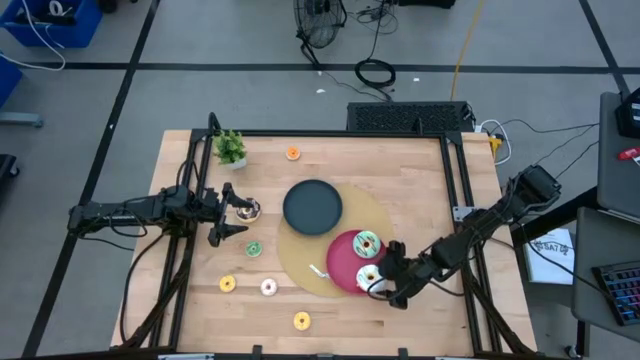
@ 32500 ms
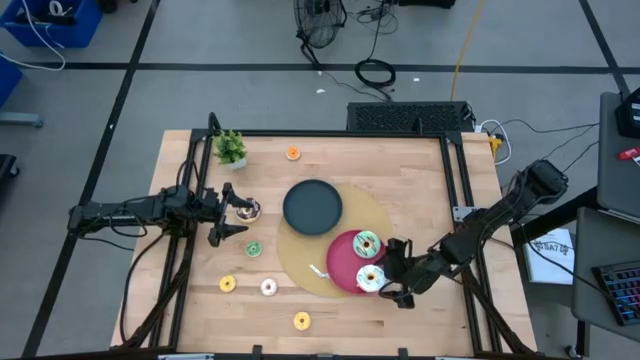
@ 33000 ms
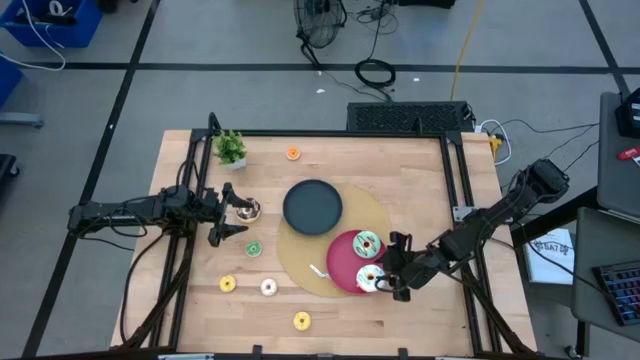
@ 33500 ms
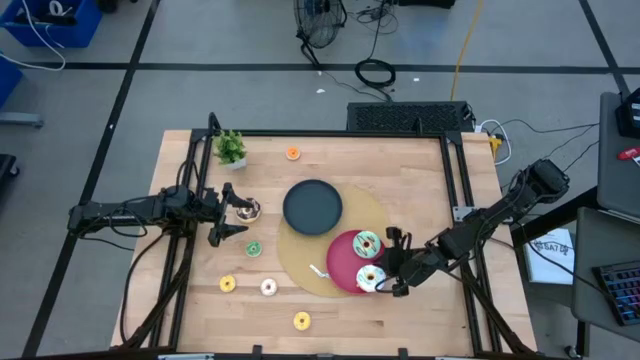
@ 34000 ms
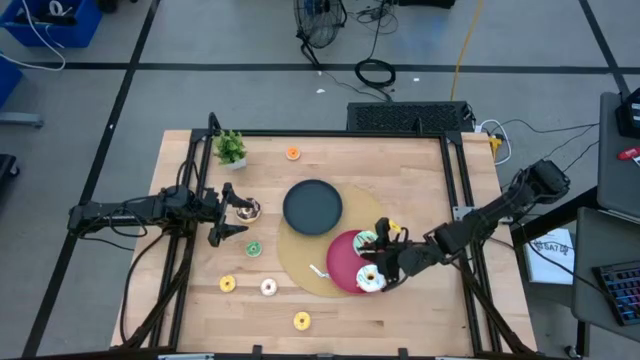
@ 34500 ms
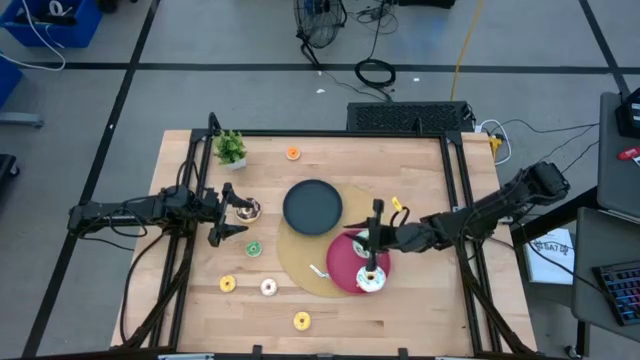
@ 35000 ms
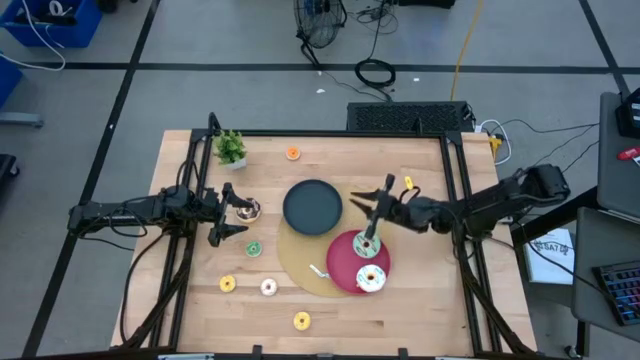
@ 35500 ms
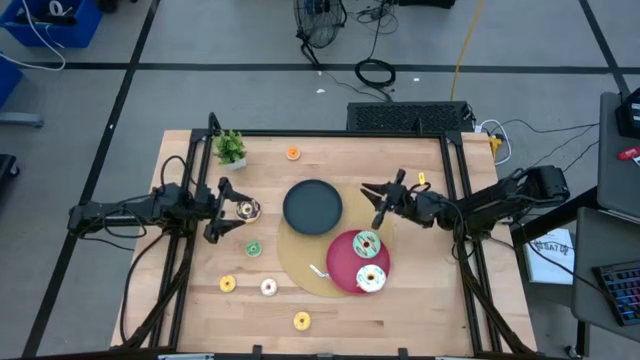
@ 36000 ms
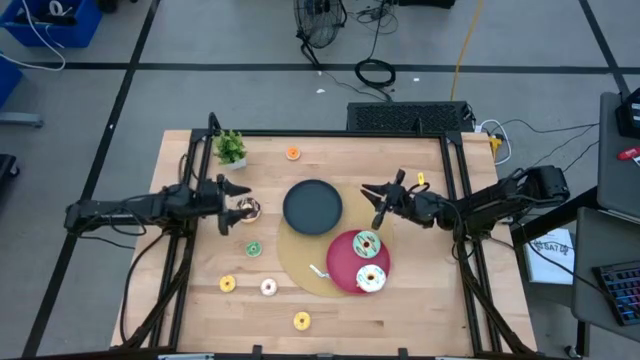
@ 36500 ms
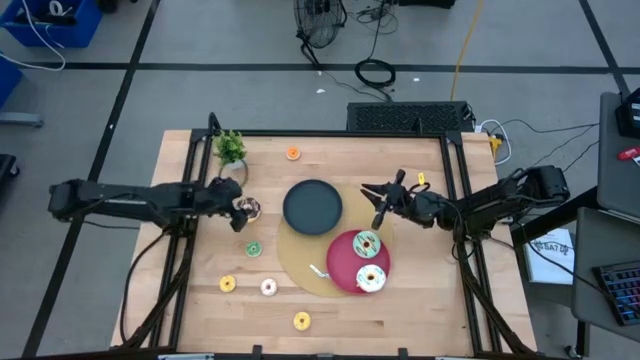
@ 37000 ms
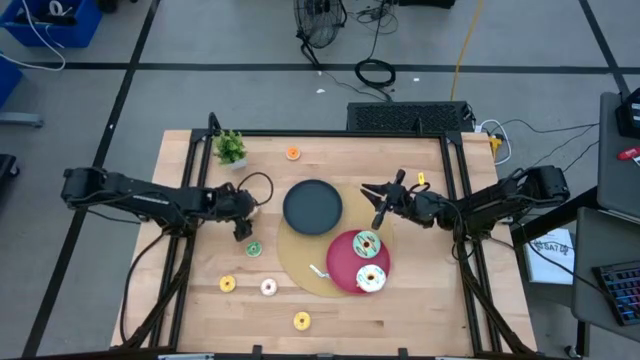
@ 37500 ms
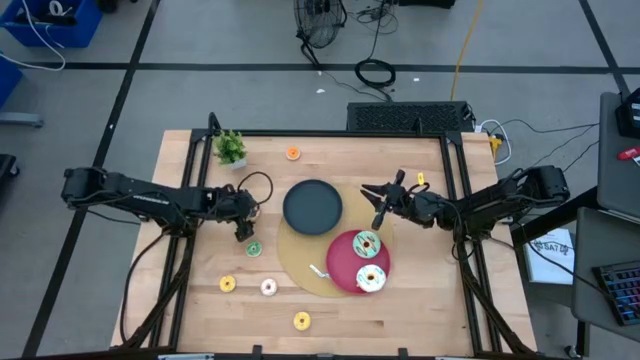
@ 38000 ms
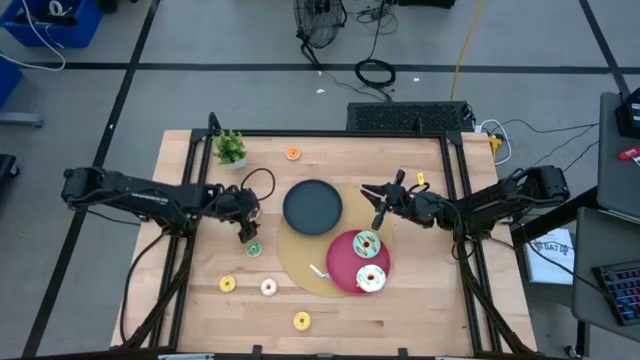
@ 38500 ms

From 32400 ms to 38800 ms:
Task: Pick & Place donuts
Put the large black doughnut on the pink plate

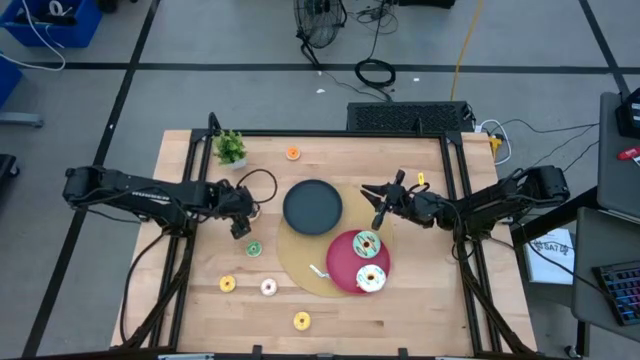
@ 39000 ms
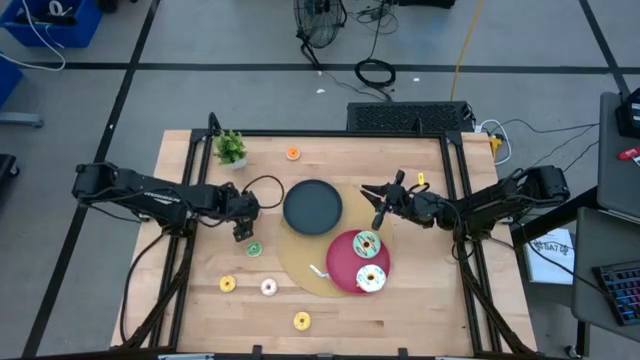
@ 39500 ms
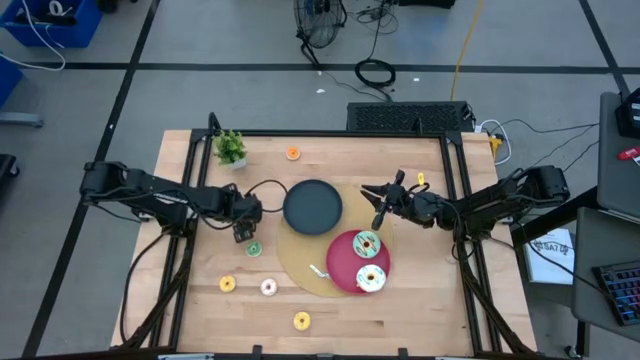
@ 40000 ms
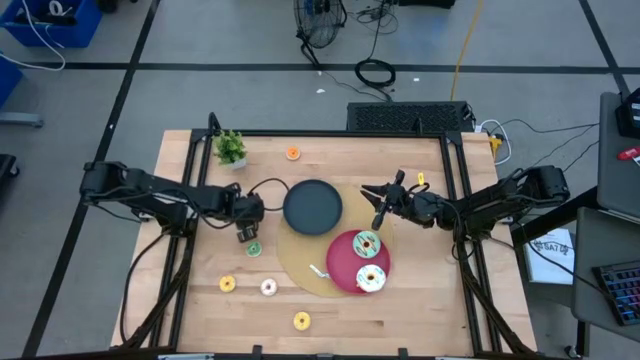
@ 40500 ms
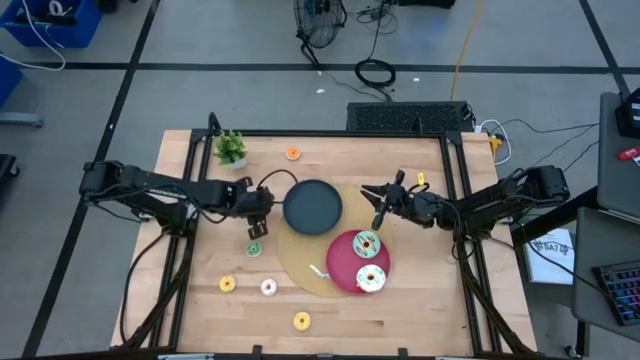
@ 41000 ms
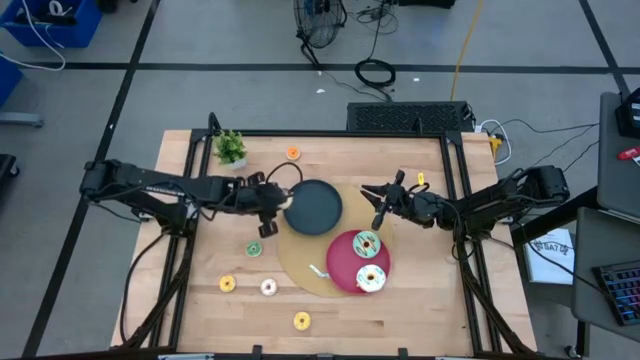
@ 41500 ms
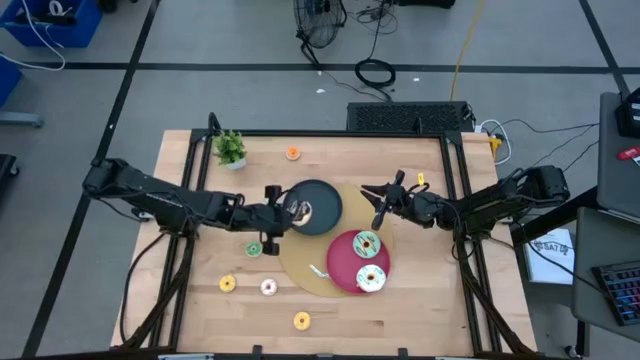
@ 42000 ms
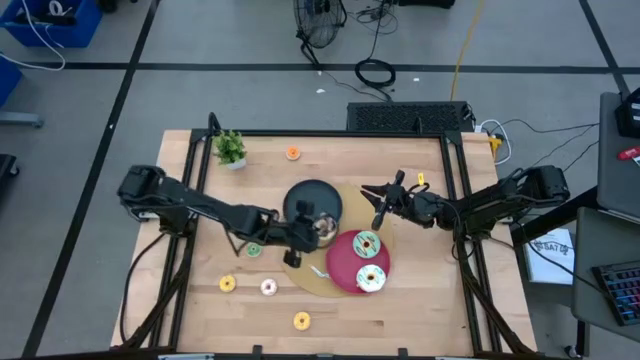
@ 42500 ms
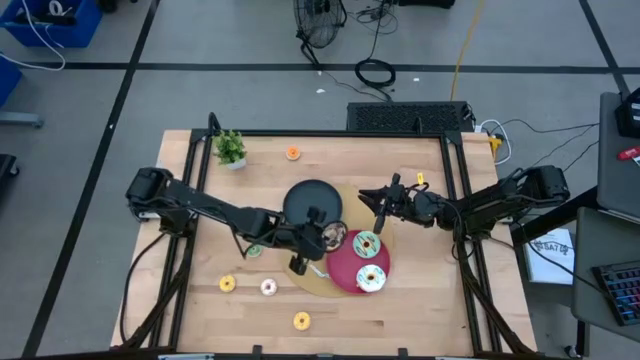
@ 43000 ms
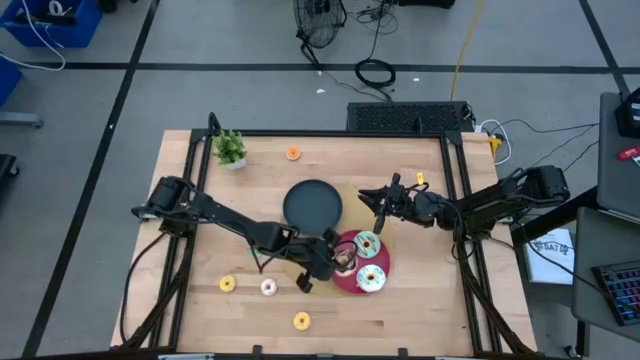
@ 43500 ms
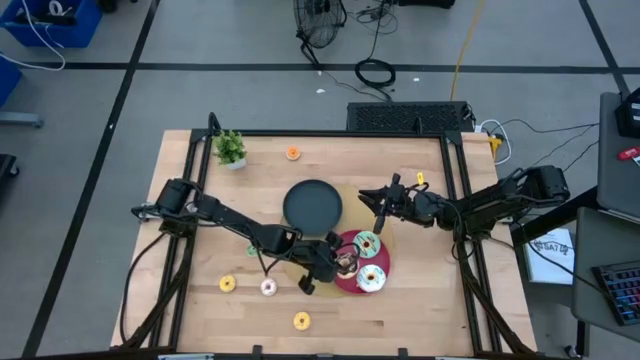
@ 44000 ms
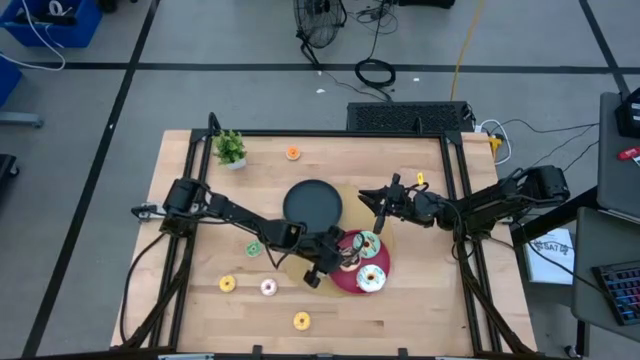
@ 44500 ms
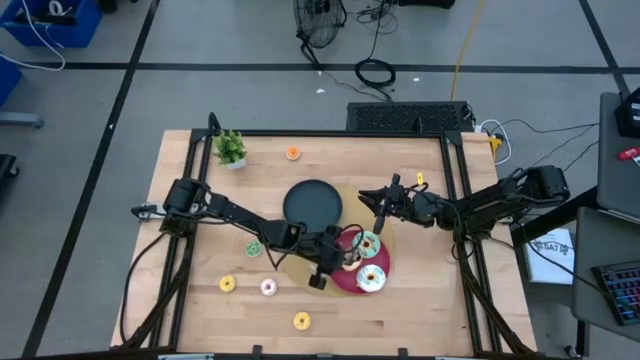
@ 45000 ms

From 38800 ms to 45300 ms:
Put the large black doughnut on the pink plate

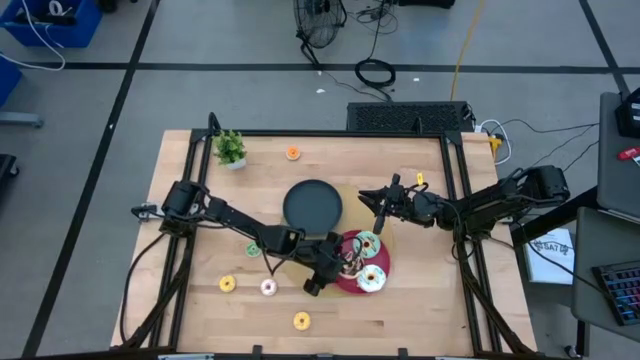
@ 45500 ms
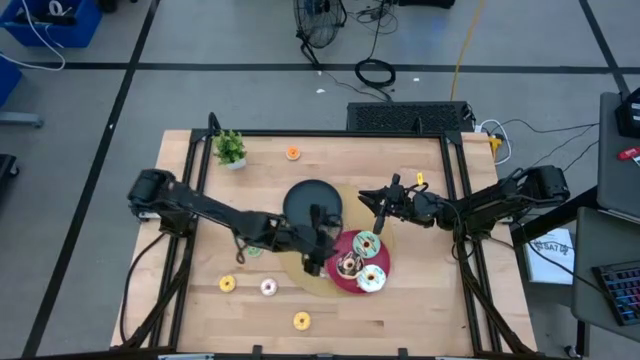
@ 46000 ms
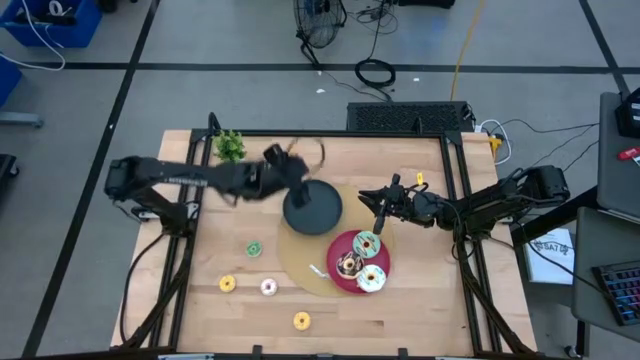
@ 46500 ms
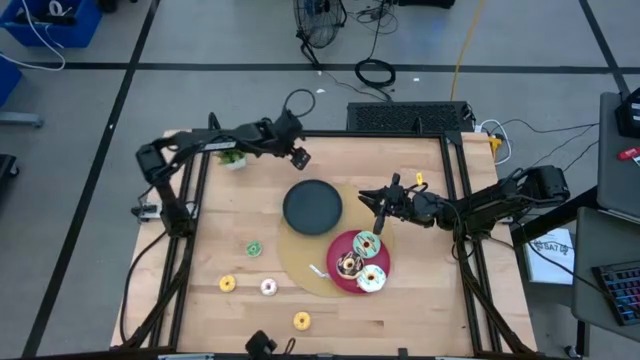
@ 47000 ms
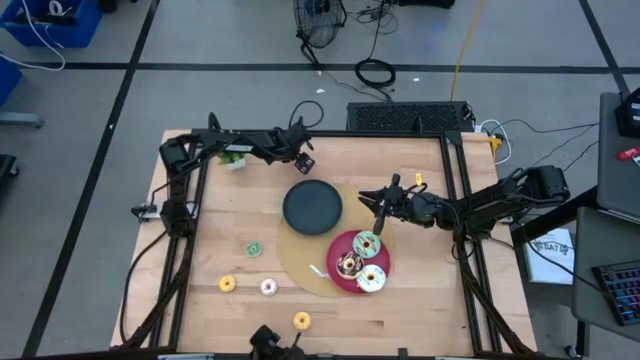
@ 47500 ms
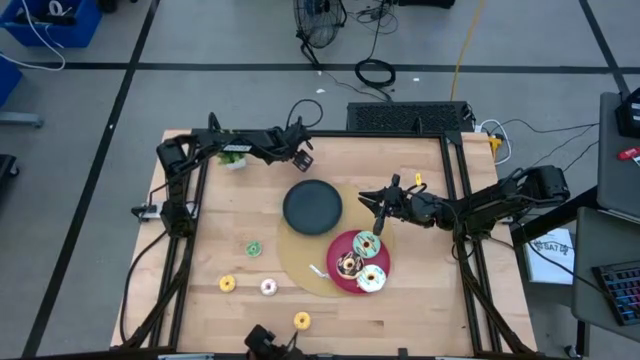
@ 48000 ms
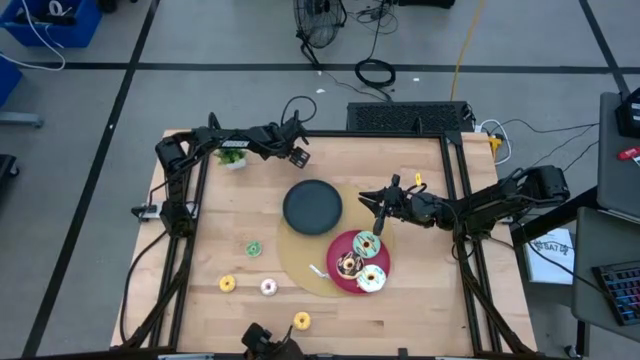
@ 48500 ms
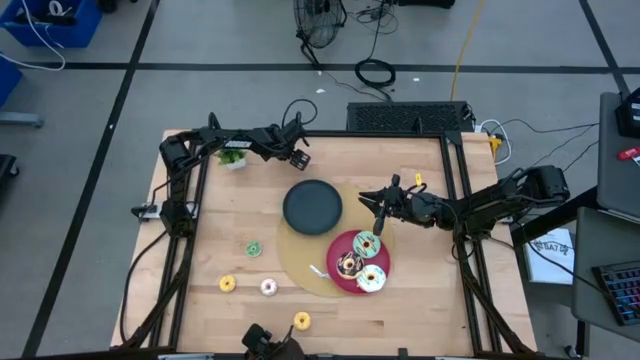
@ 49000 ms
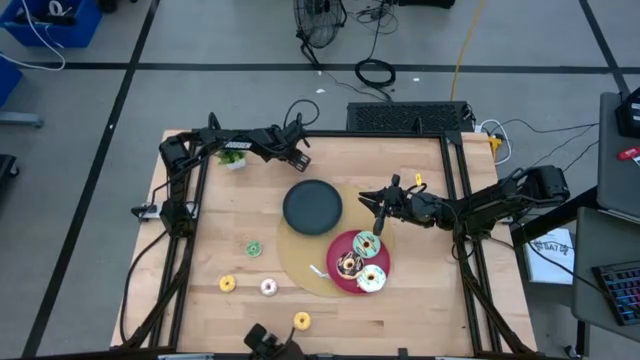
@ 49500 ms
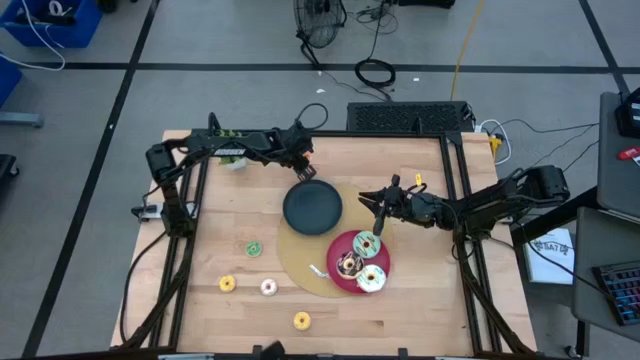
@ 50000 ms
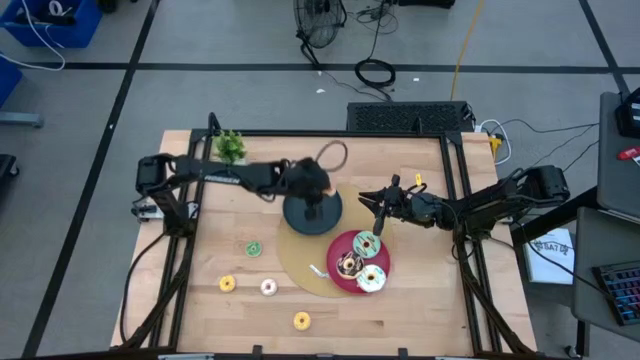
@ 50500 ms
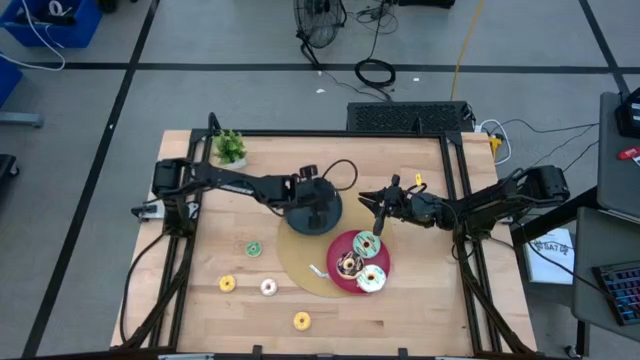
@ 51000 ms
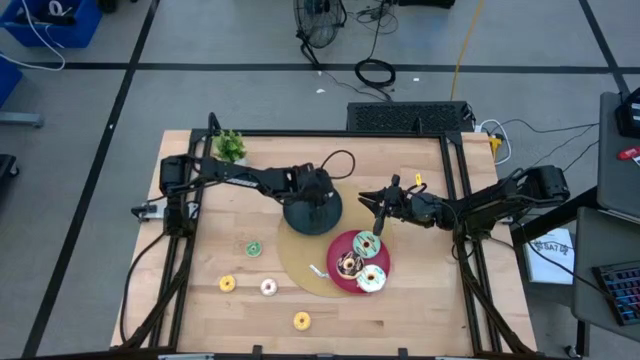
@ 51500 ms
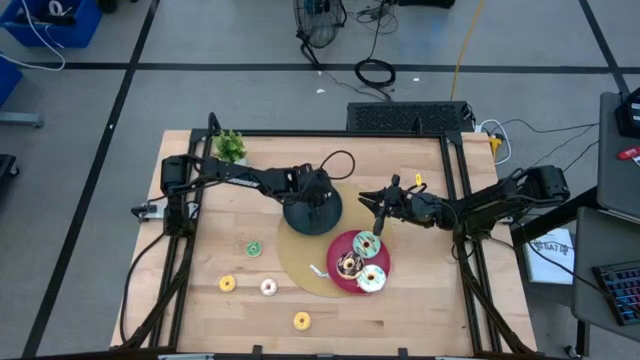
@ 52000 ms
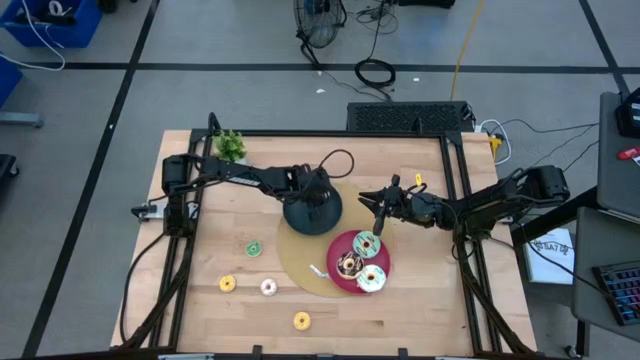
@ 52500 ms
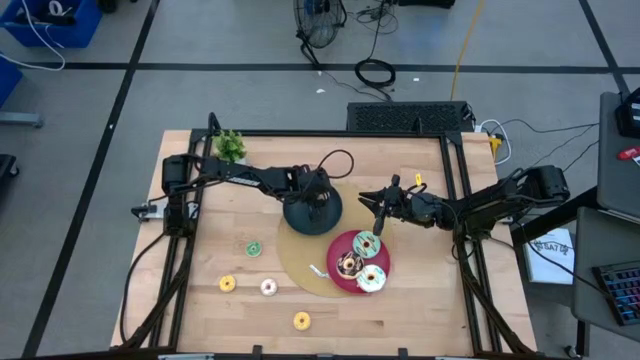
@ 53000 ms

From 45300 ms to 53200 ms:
Put the small orange doughnut on the blue plate
